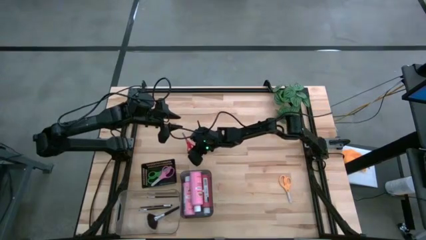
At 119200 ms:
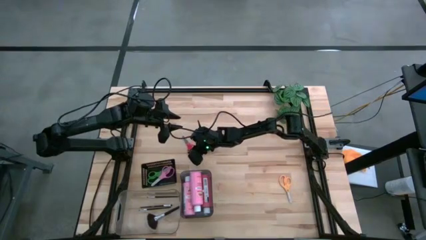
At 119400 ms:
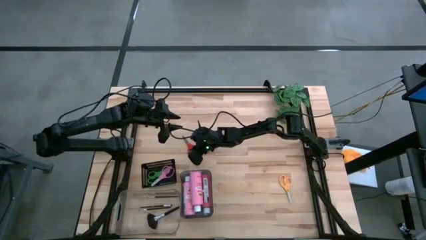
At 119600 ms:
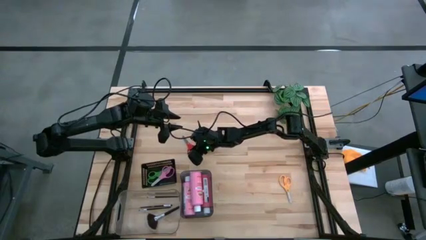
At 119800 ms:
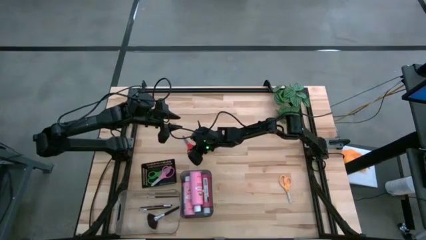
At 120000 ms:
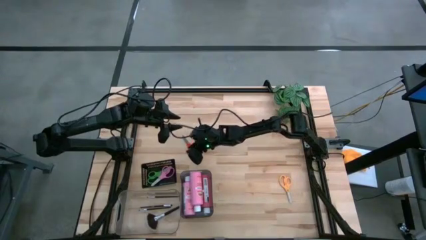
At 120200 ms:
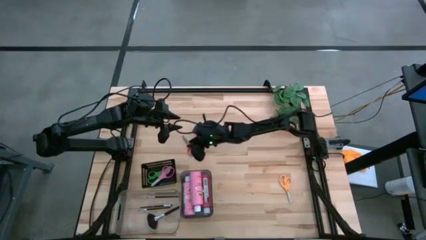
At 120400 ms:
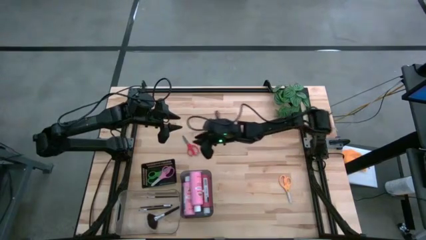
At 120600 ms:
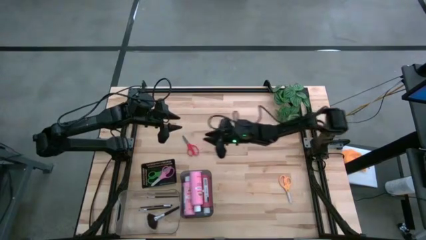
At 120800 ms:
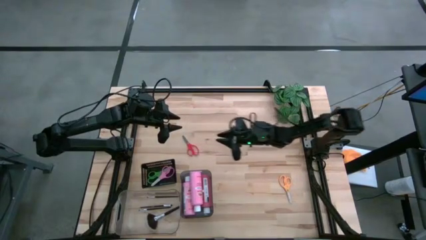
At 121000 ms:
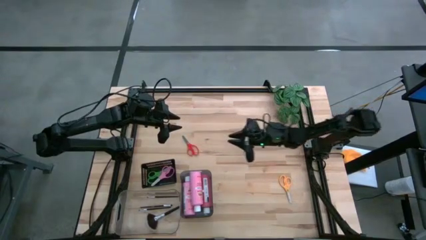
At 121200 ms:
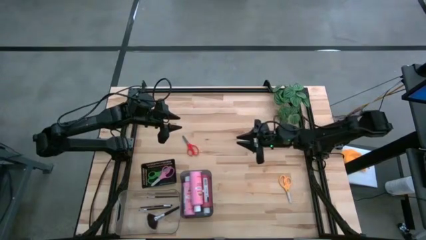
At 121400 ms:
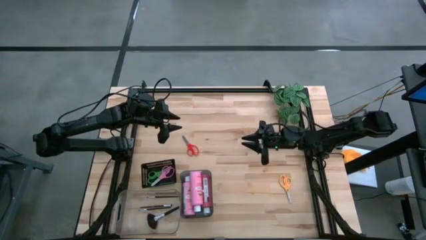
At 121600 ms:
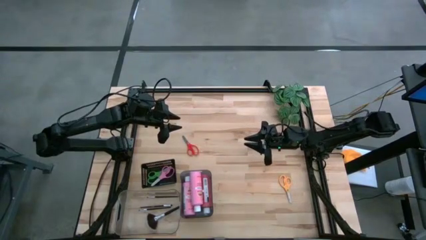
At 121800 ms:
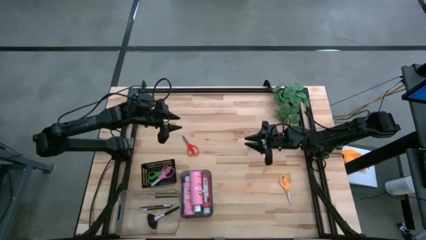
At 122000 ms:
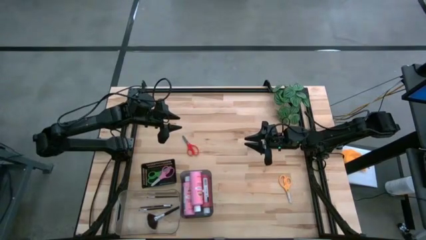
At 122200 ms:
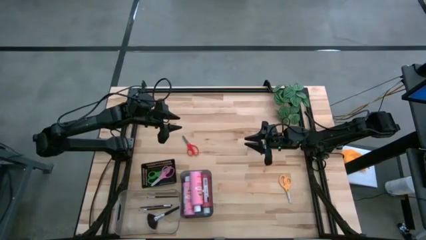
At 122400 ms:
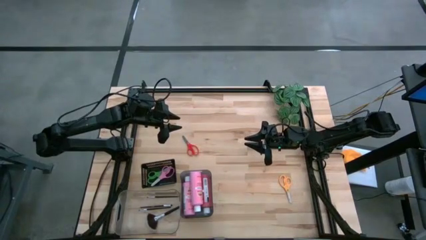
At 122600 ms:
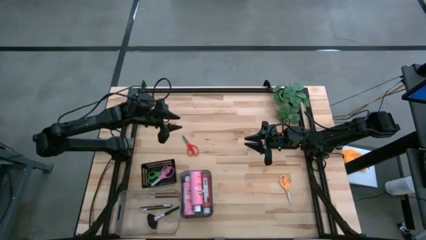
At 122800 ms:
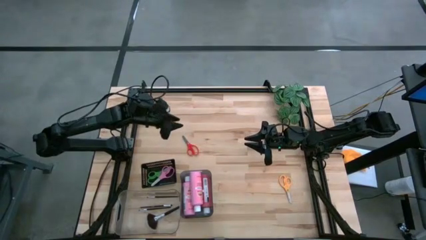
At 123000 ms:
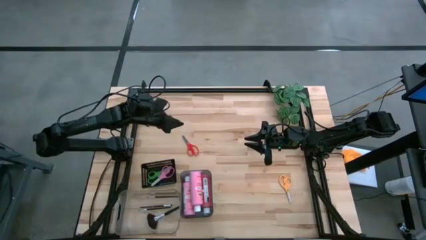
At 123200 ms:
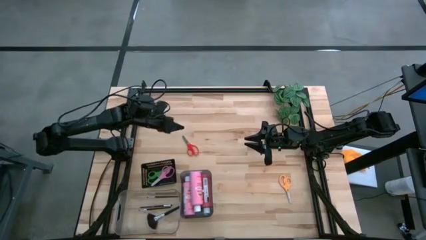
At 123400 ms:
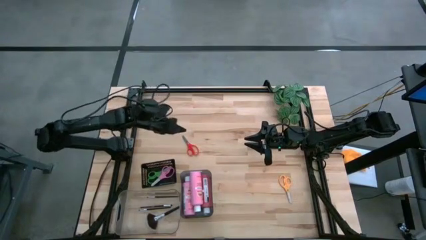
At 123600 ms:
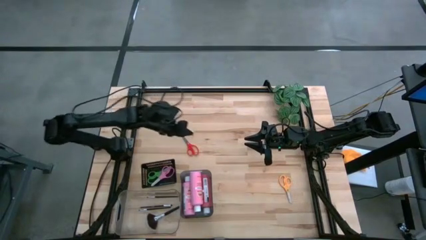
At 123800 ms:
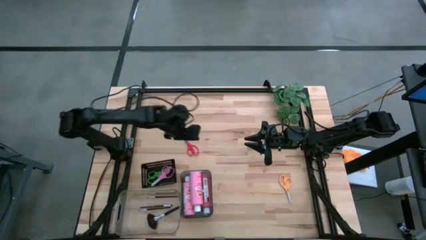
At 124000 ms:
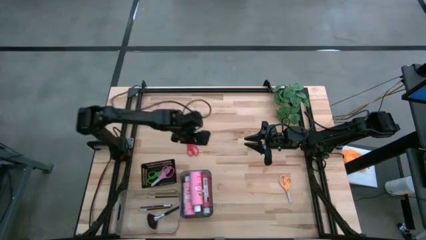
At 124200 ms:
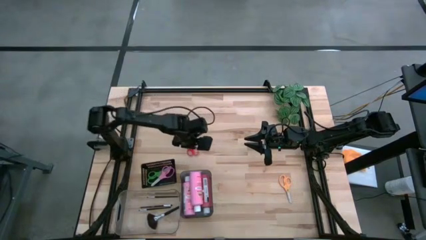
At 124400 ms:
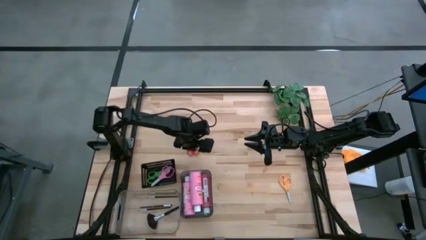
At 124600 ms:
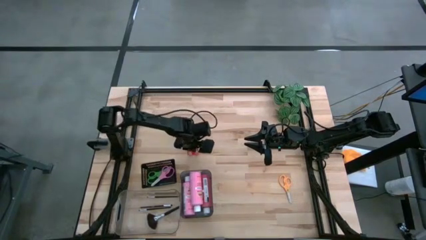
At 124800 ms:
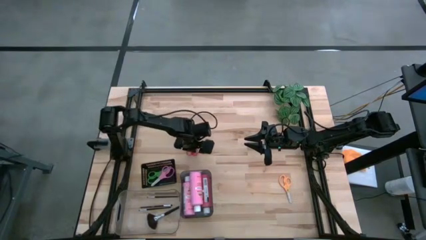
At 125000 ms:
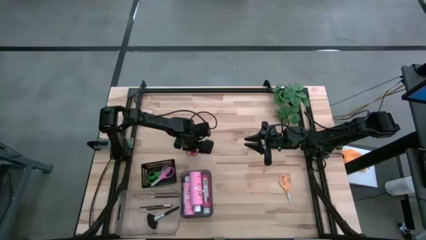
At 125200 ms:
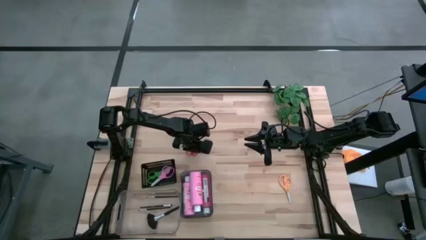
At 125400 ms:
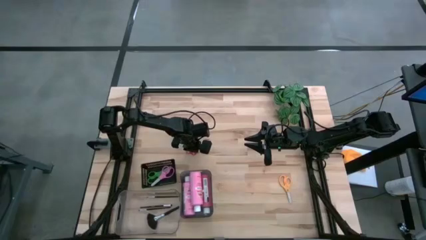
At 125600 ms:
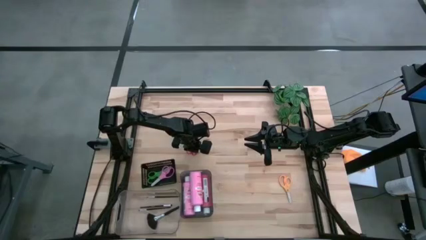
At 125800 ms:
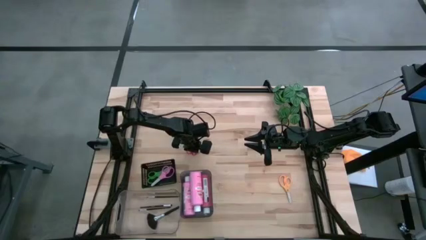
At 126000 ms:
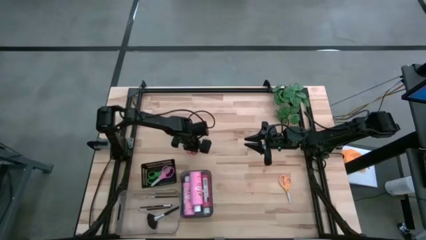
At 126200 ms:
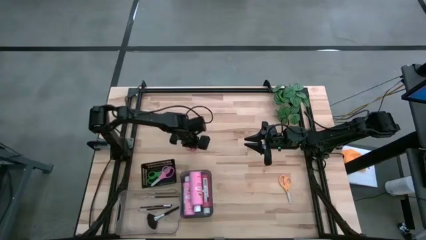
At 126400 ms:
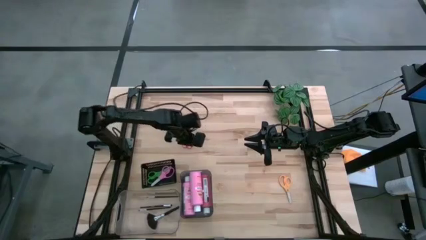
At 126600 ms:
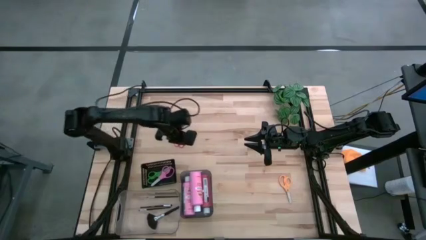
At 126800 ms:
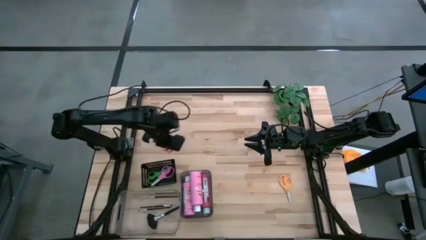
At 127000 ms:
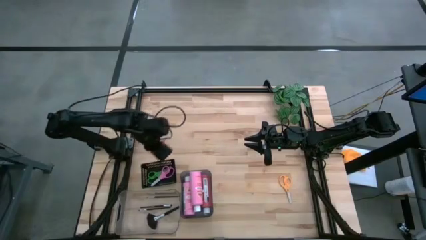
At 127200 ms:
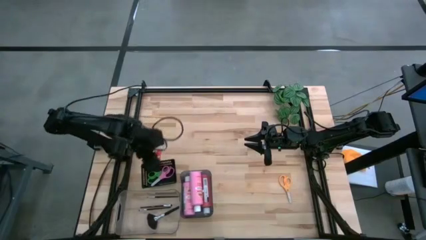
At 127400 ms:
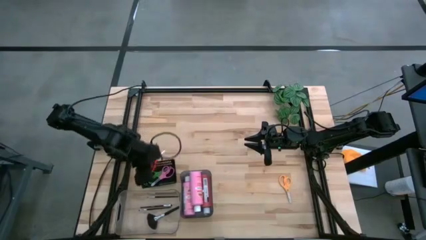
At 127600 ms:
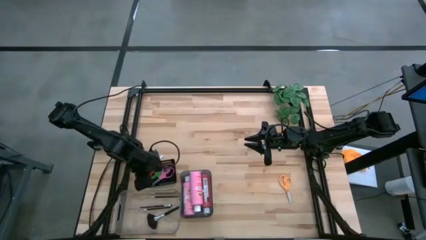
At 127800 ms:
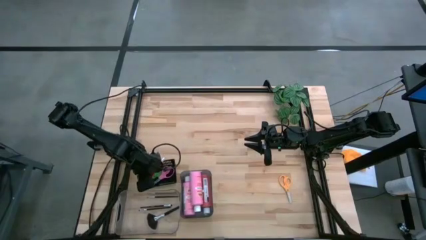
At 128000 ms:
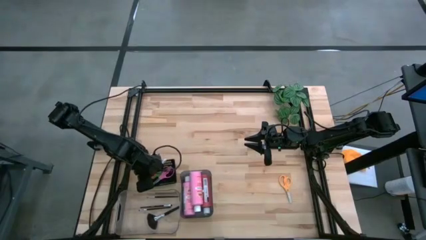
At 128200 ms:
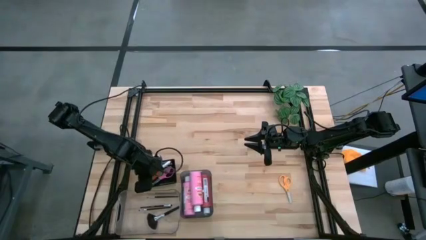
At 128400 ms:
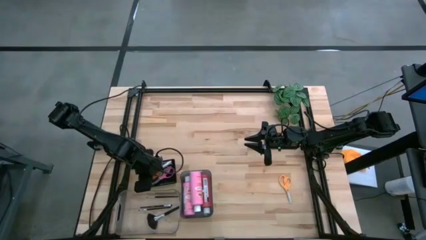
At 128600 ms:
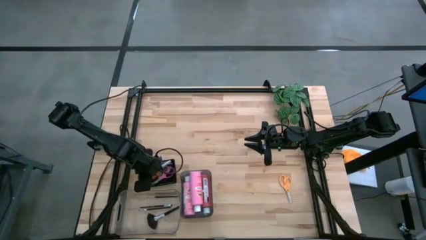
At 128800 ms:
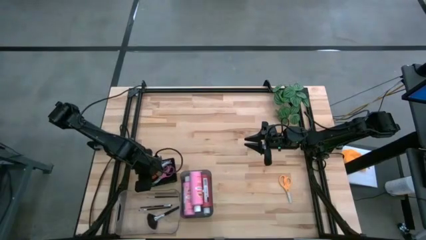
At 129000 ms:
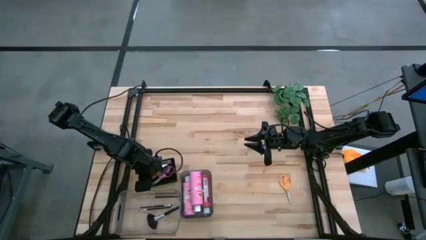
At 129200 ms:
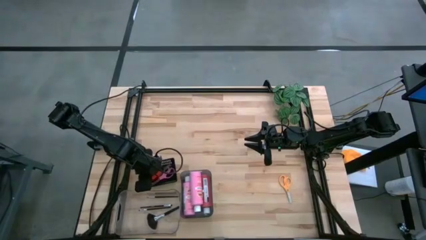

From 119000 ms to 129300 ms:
Task: Pick & Place Paint Supplies
Put the red scissors into the black bin

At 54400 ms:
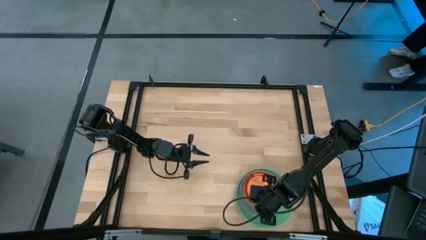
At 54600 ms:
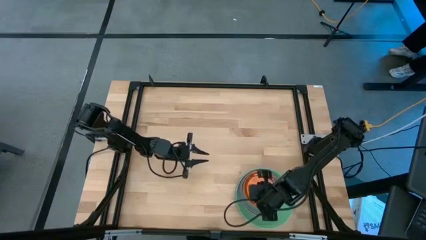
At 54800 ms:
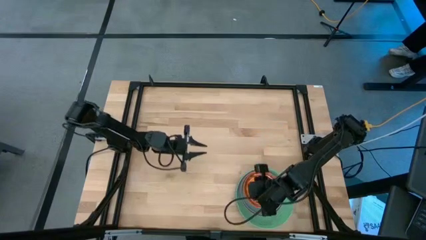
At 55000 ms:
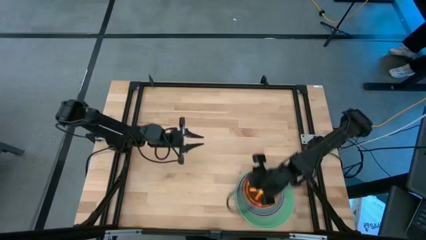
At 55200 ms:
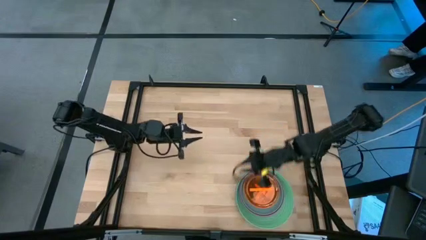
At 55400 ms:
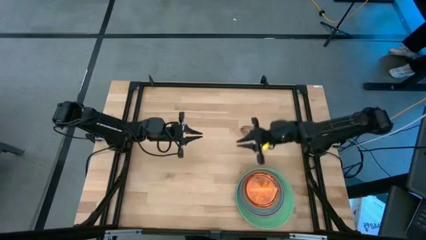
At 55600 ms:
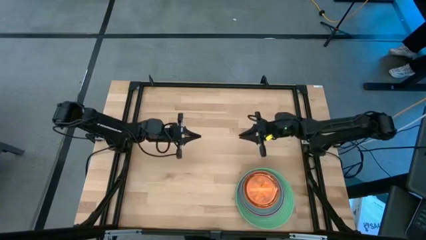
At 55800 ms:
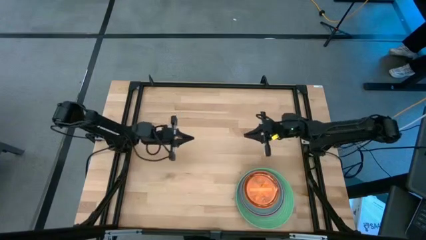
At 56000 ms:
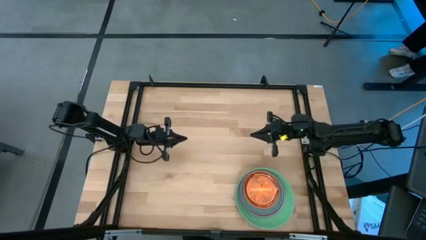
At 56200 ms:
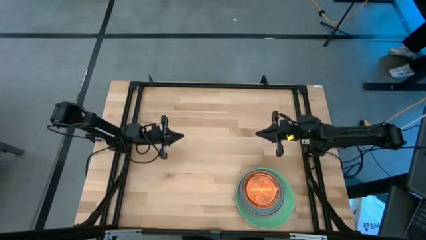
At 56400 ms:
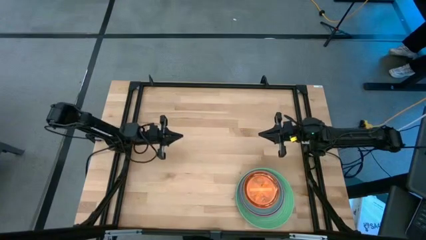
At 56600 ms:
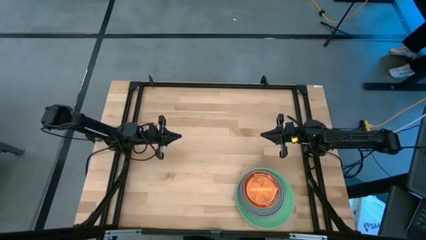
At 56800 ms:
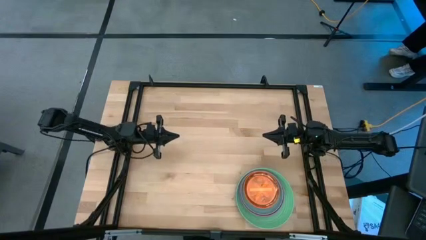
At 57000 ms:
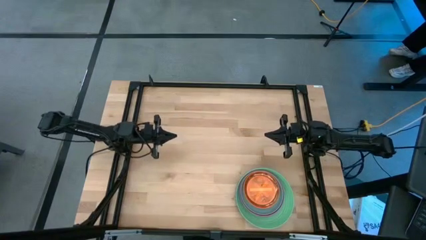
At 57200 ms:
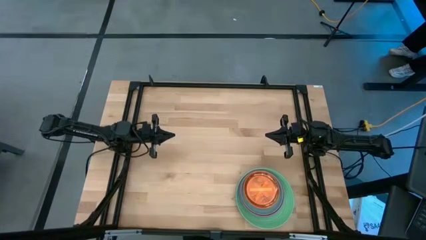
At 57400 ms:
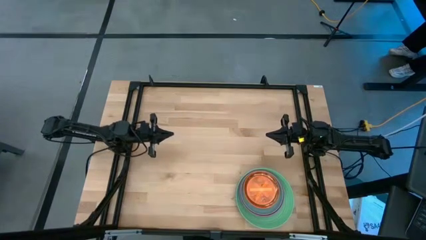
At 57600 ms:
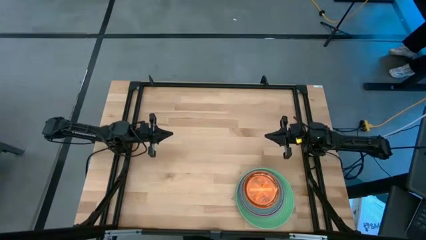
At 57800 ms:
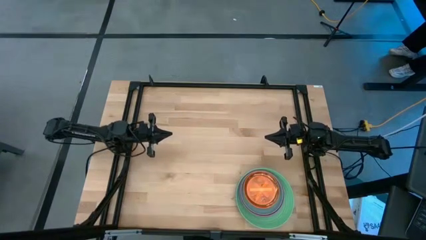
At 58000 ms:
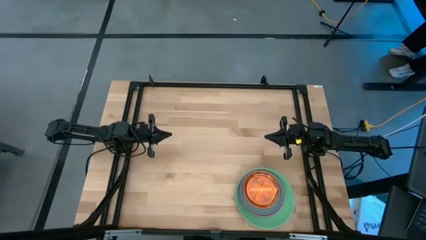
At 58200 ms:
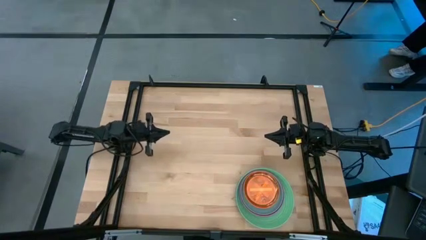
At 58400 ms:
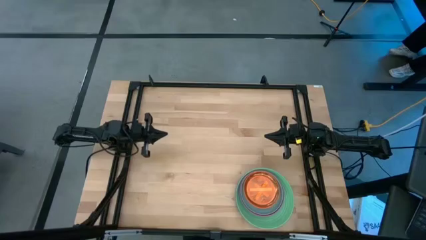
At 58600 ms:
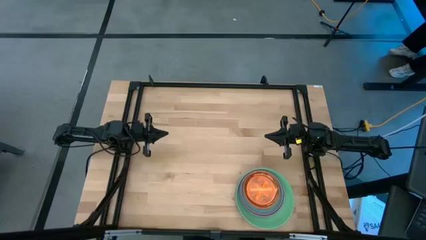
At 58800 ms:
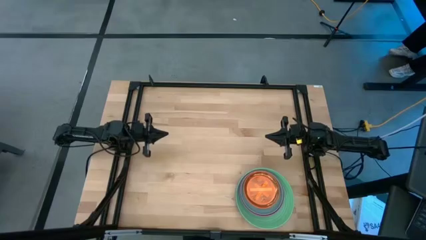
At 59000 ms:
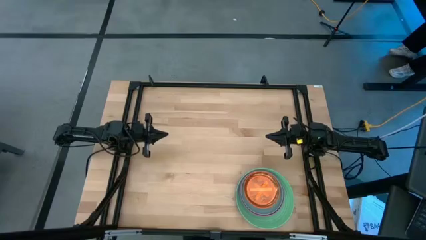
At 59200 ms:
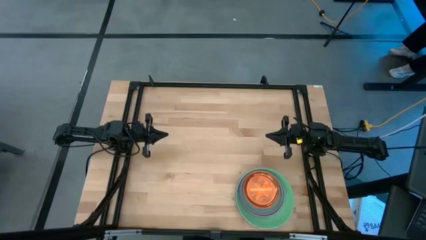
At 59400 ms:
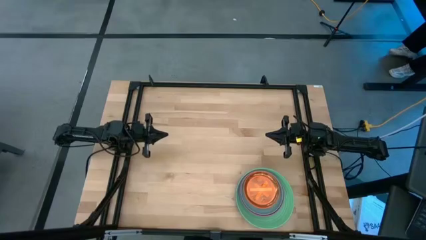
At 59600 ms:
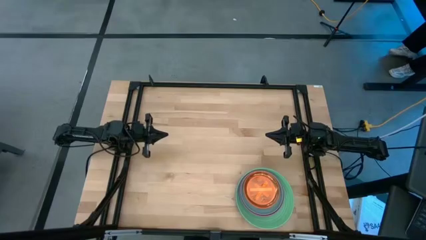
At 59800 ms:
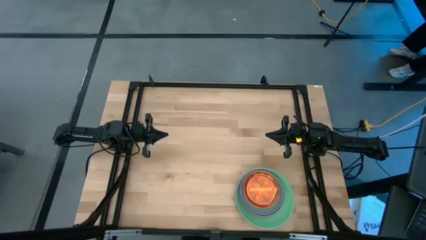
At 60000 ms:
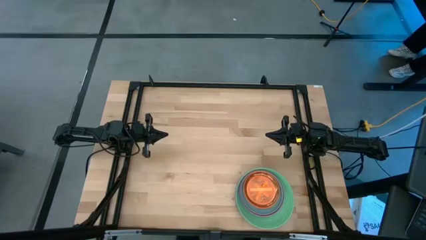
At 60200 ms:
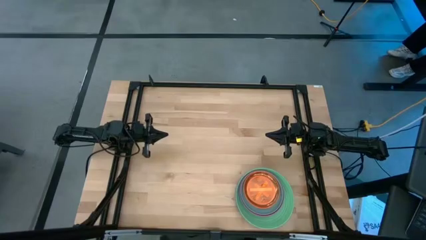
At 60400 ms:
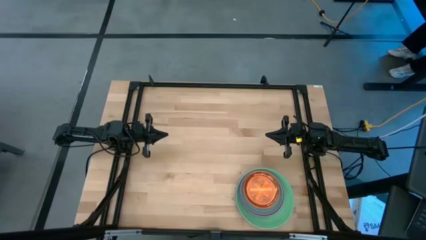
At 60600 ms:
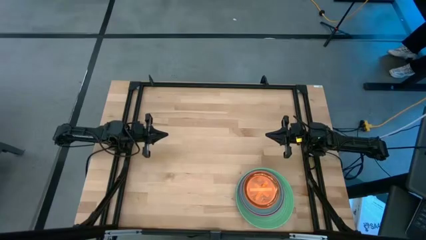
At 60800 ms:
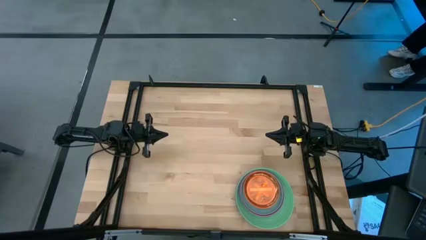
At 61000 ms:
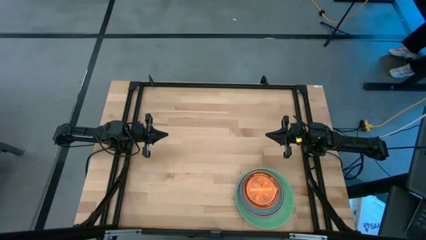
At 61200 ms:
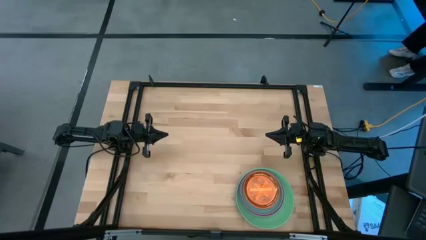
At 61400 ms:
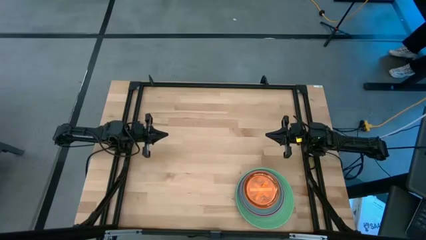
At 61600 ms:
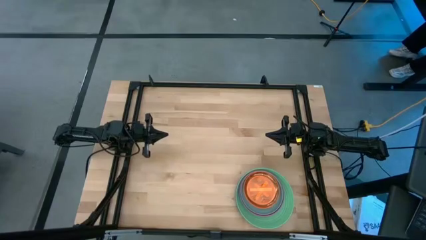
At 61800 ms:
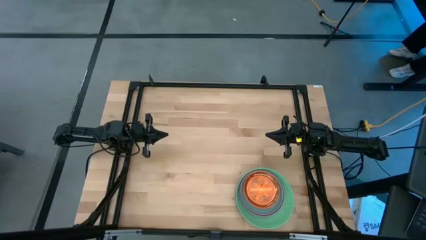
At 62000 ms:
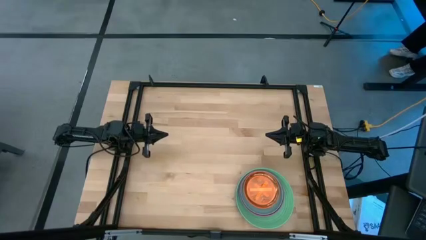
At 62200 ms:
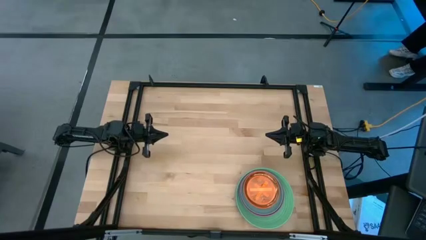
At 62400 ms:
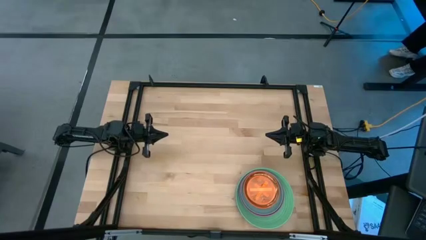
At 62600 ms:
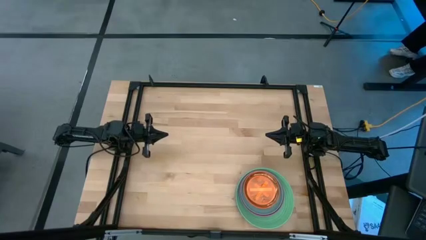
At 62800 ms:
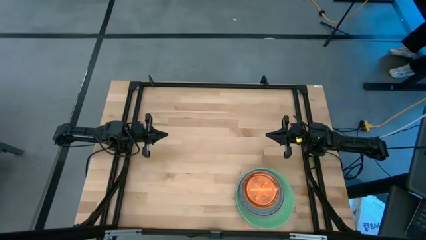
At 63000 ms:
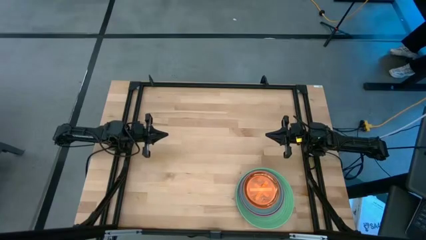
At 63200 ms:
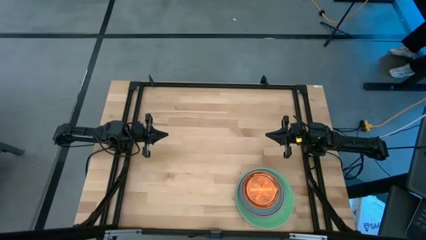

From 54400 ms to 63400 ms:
Task: Stack plastic plates
Return to Home Position
